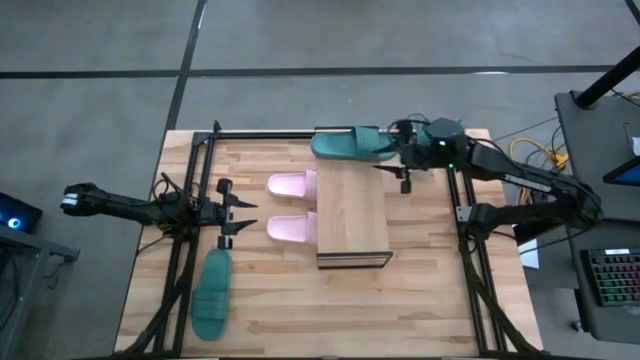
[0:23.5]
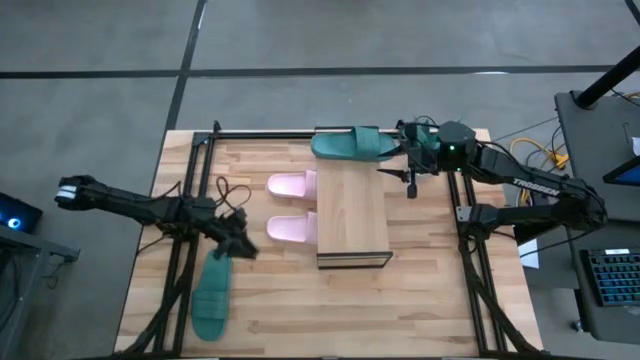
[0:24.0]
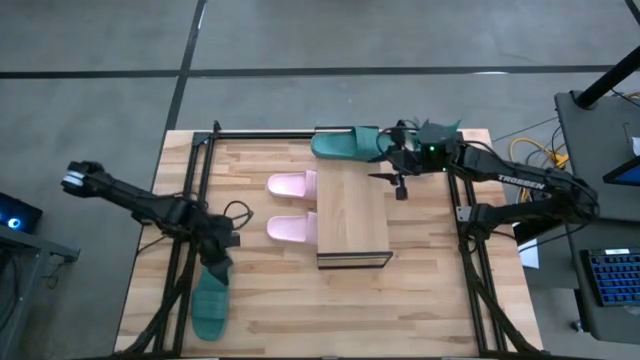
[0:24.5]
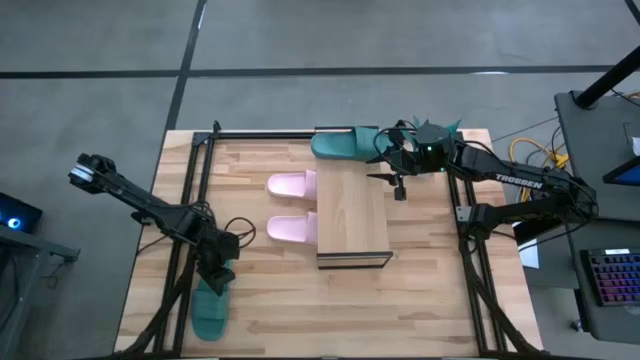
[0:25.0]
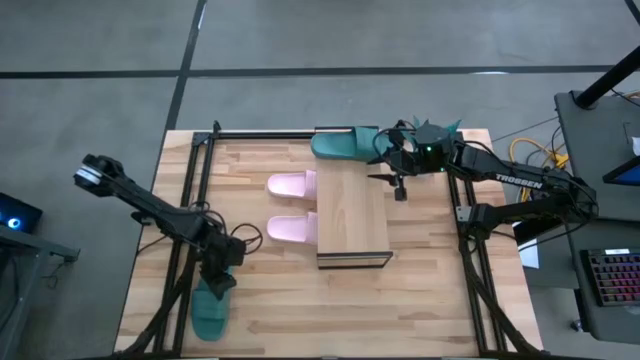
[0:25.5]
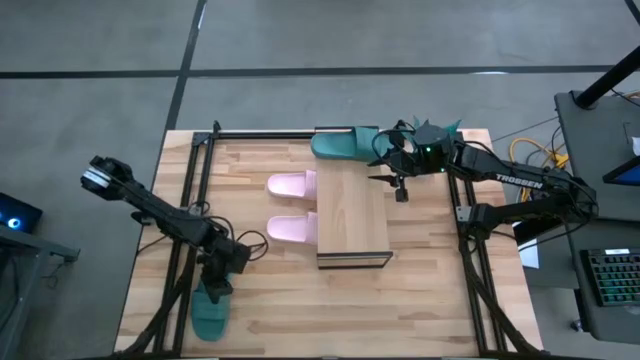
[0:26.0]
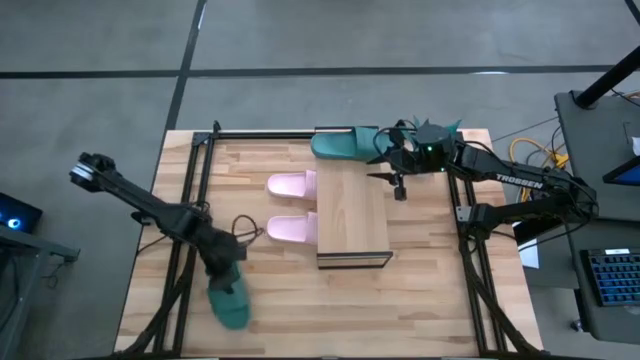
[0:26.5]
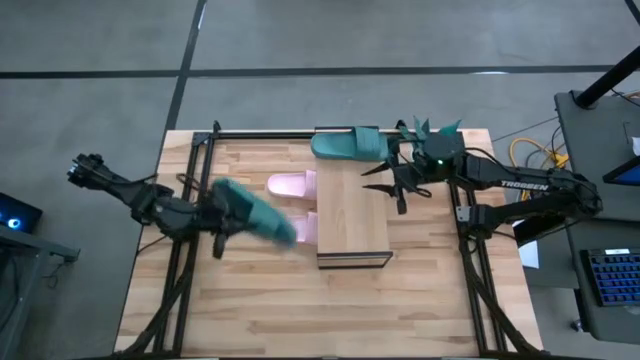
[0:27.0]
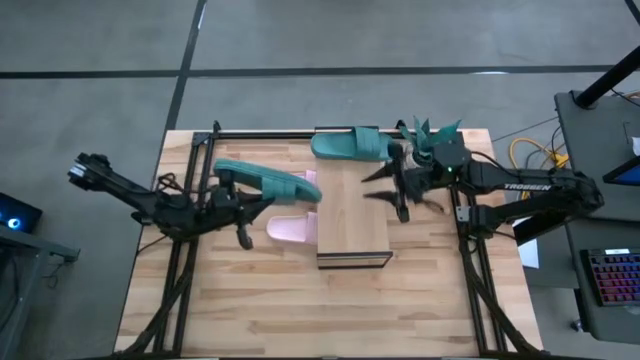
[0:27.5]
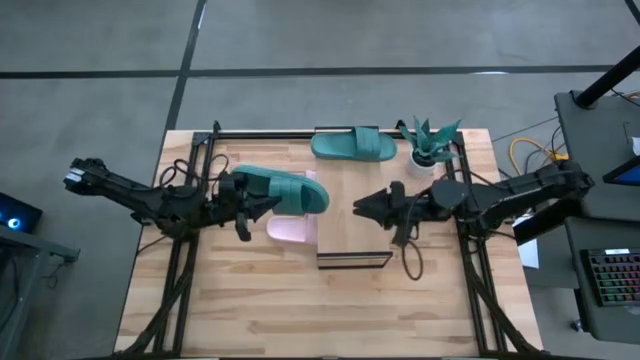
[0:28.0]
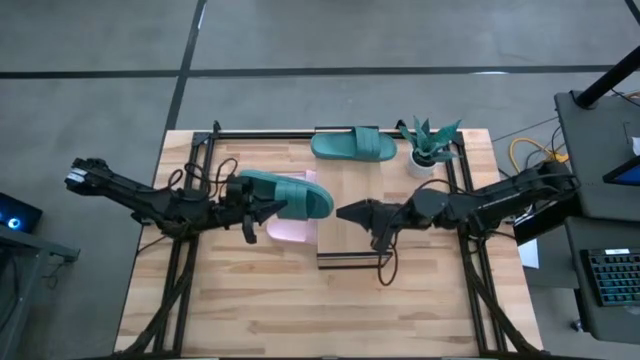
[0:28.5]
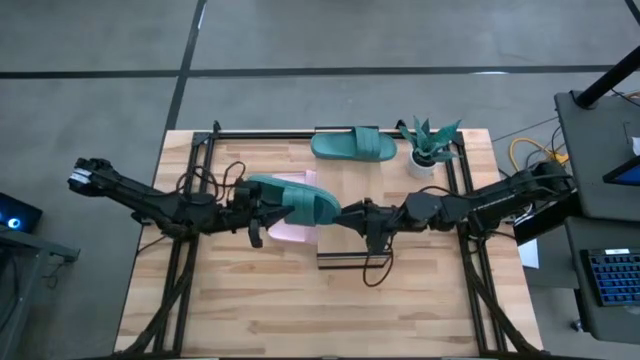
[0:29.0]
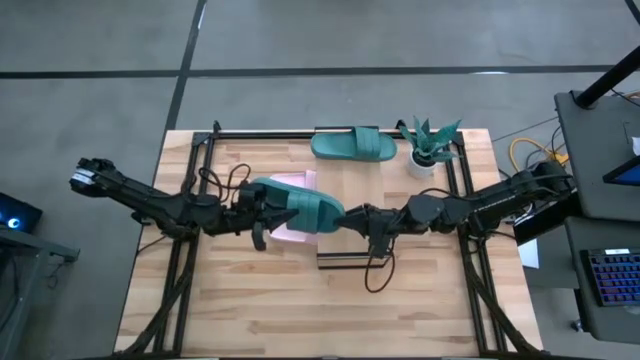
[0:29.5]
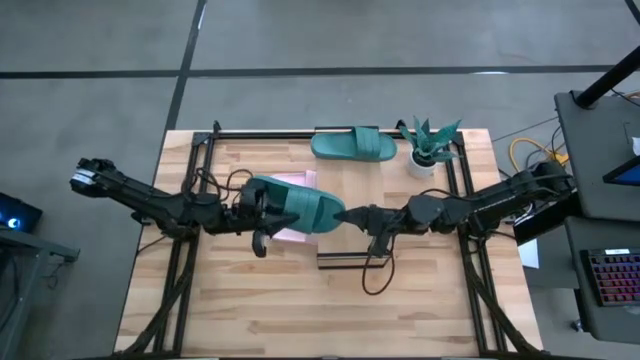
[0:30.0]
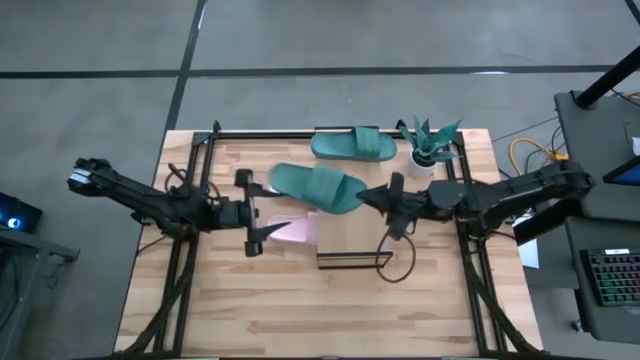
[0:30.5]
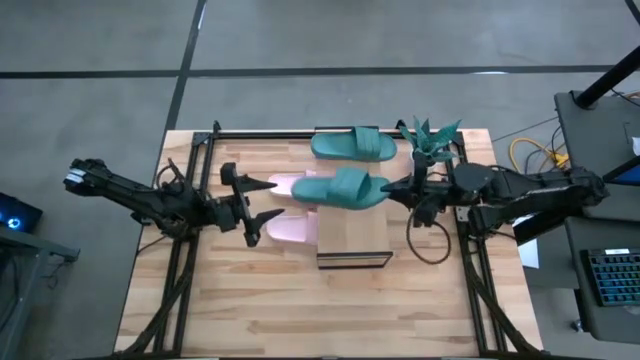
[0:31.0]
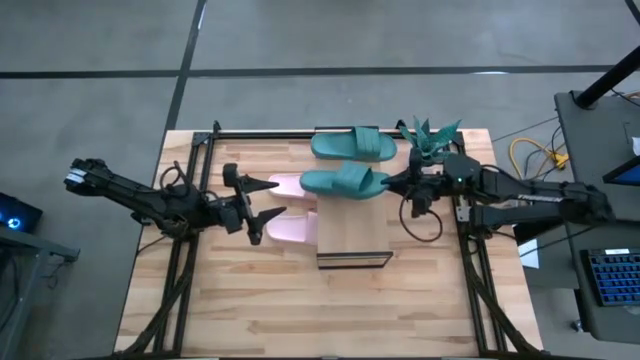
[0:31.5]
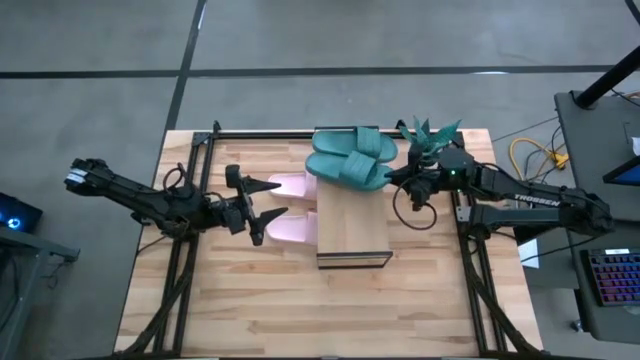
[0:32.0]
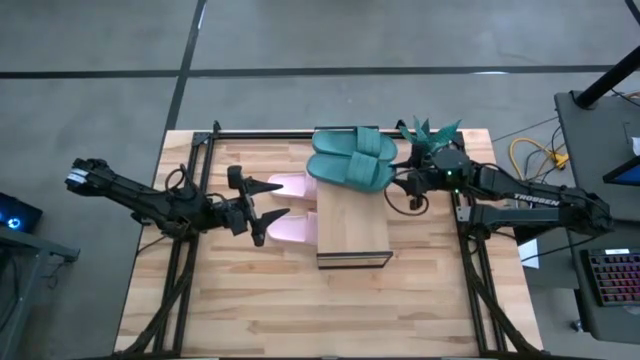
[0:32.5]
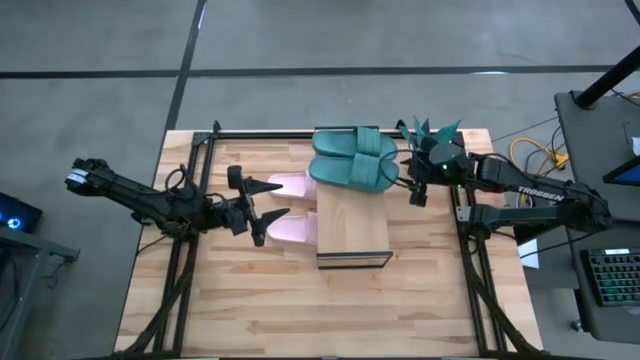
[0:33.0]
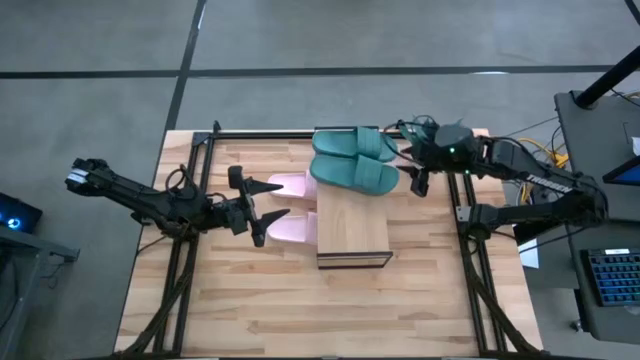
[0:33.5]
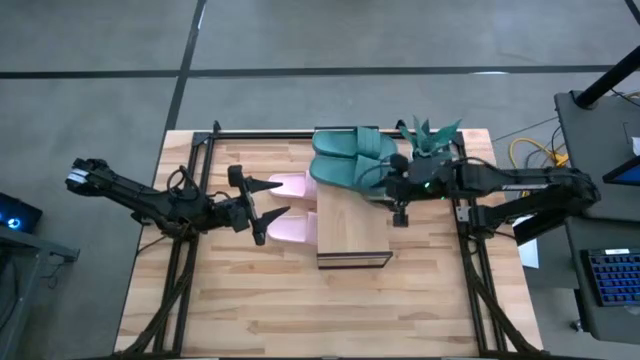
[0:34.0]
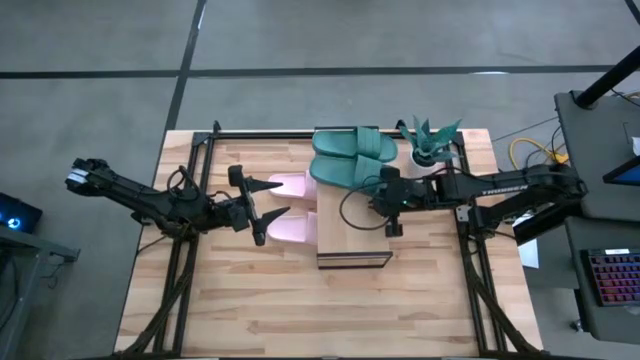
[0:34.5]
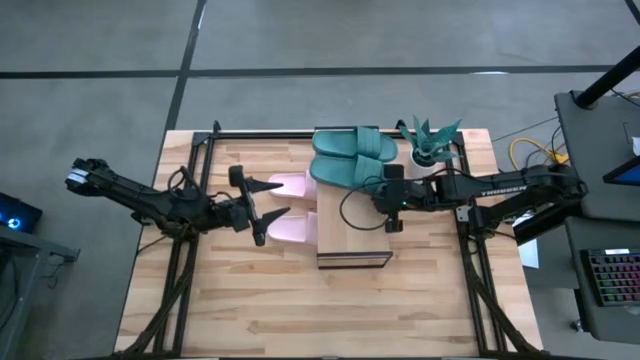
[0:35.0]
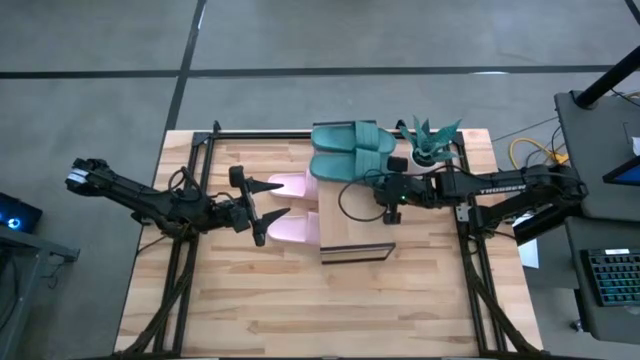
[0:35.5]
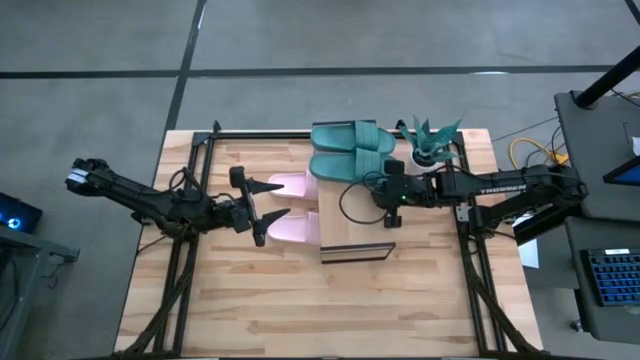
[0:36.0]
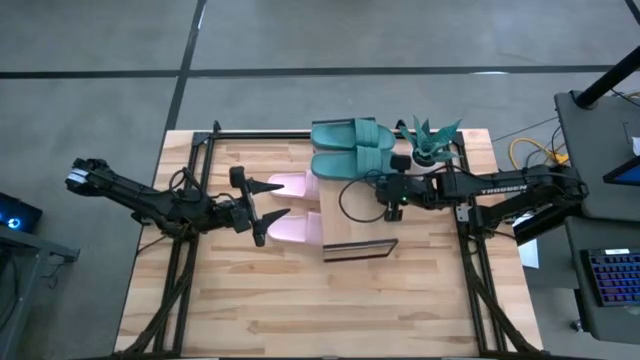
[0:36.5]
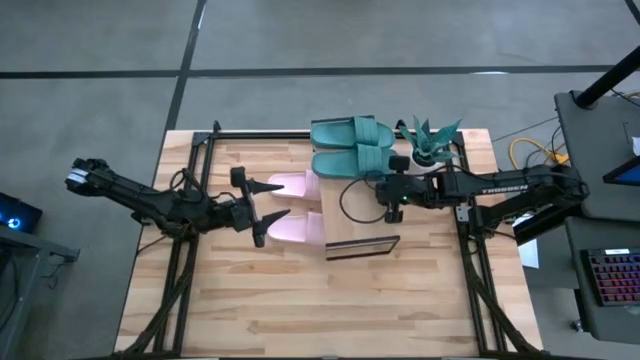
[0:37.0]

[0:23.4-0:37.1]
Task: Pick and place slides into the shelf
Put the green slide on the shelf
